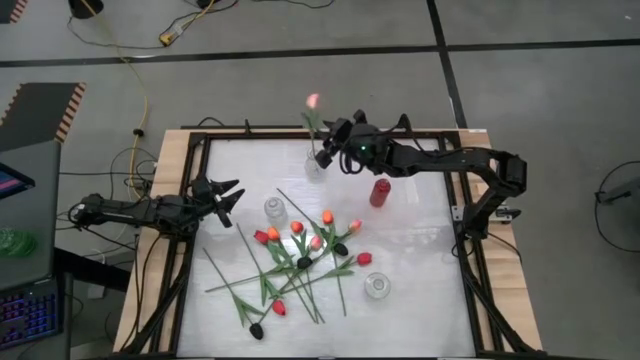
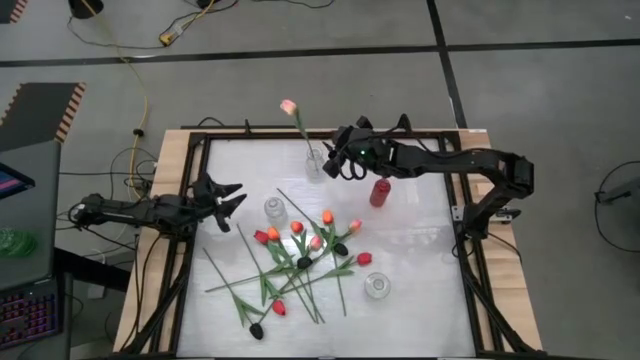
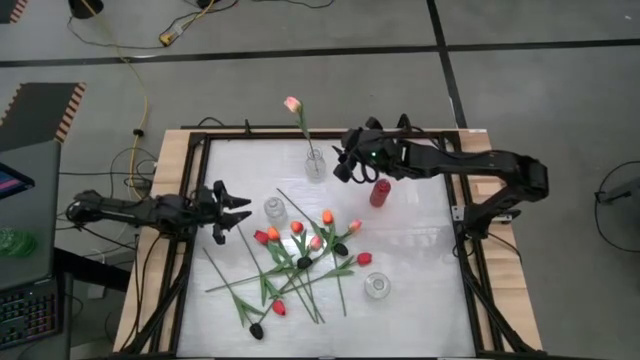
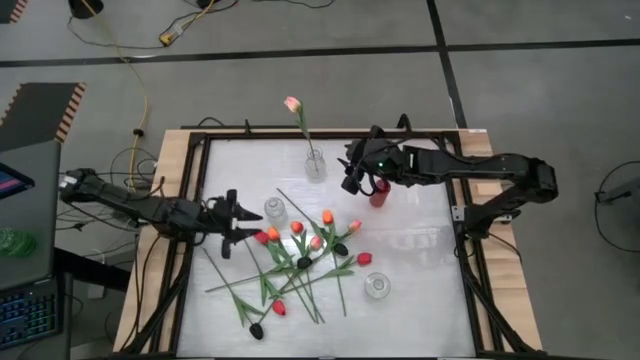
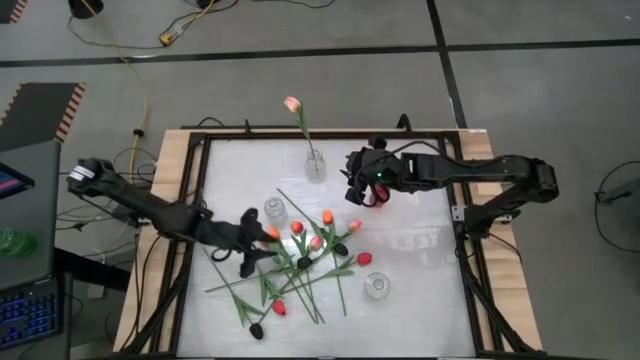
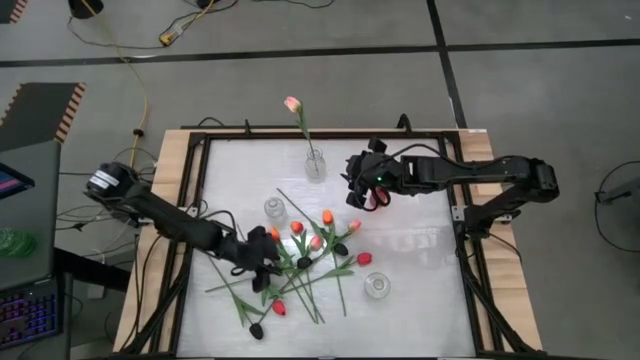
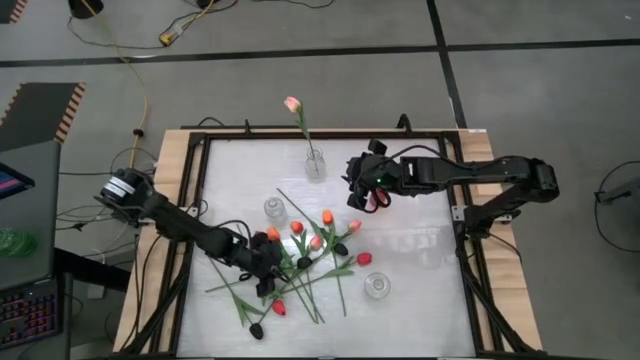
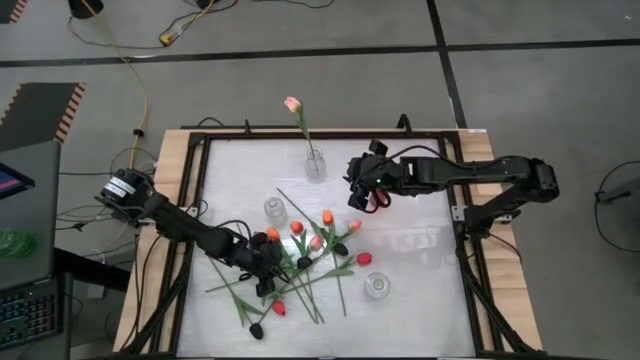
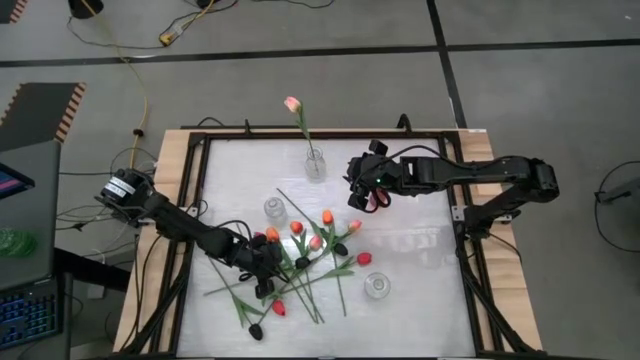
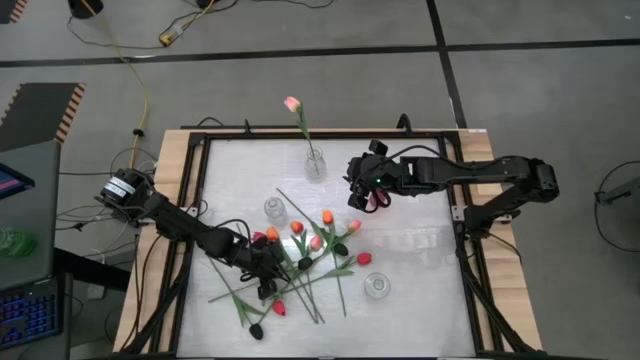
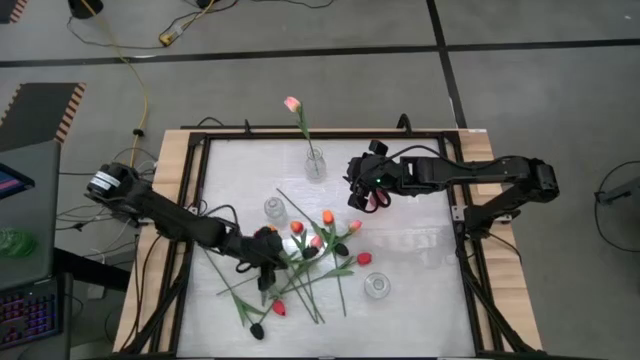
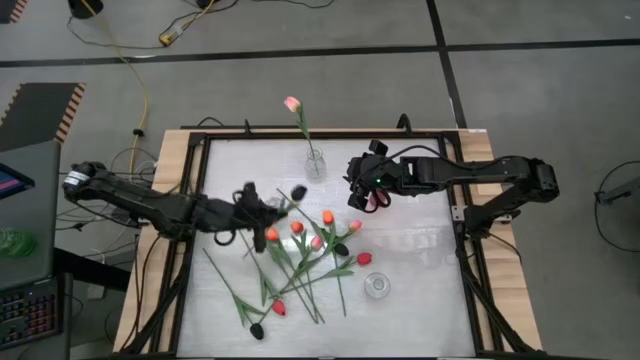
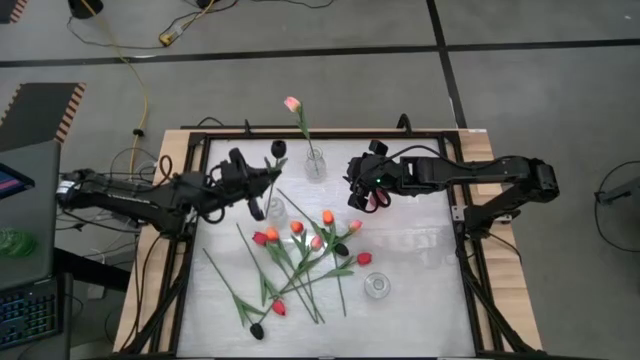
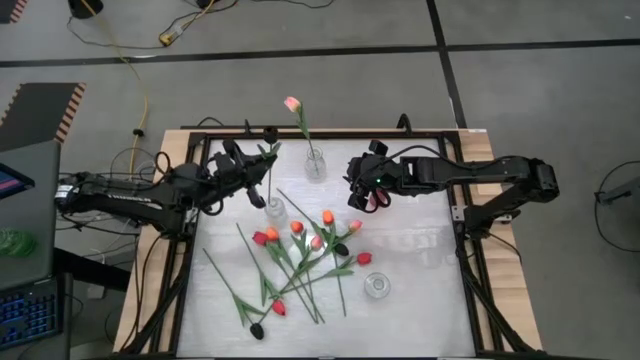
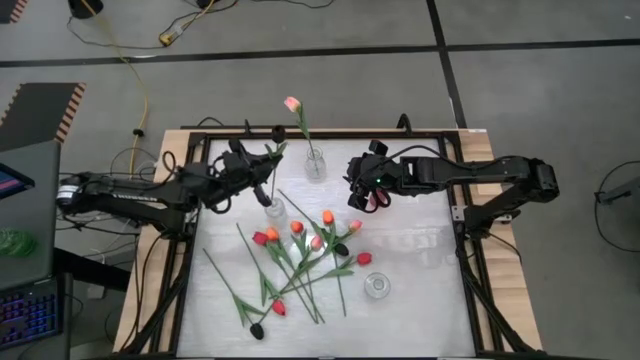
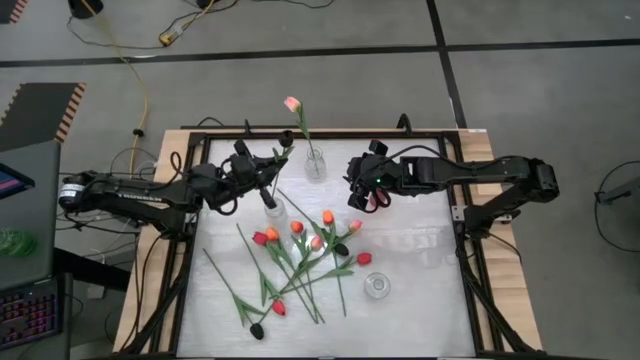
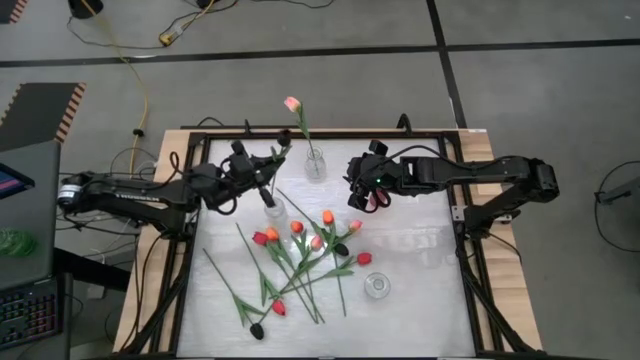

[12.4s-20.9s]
Task: Sort flowers into vase by color
Put the black tulip into the middle transparent vase

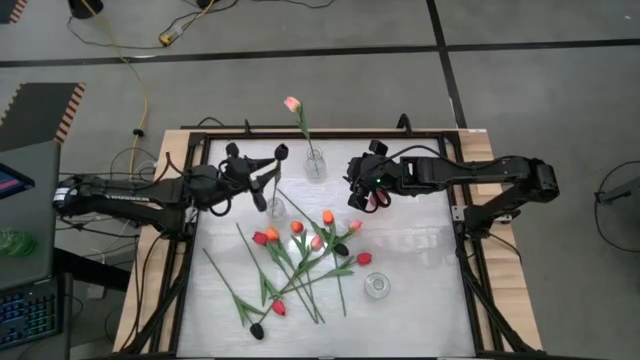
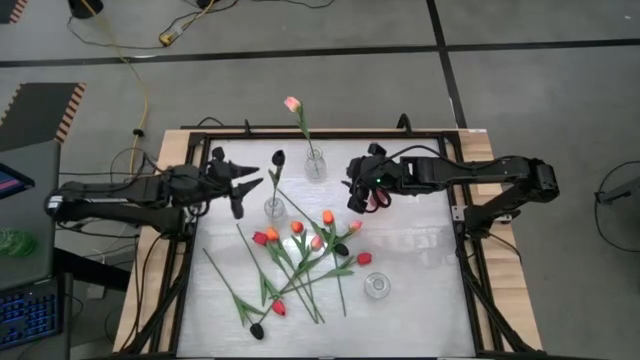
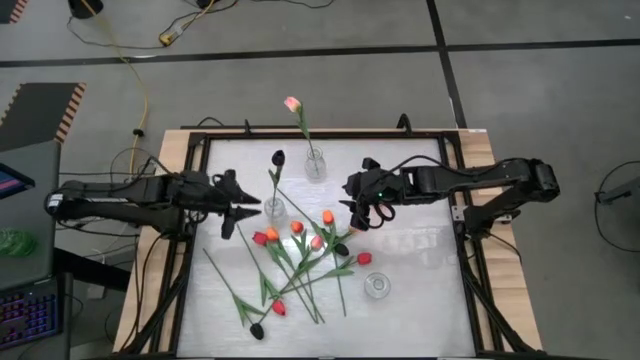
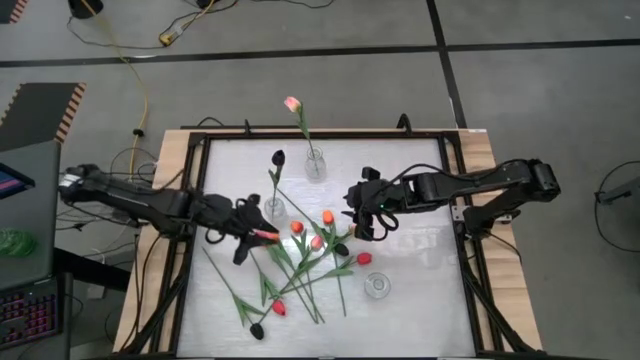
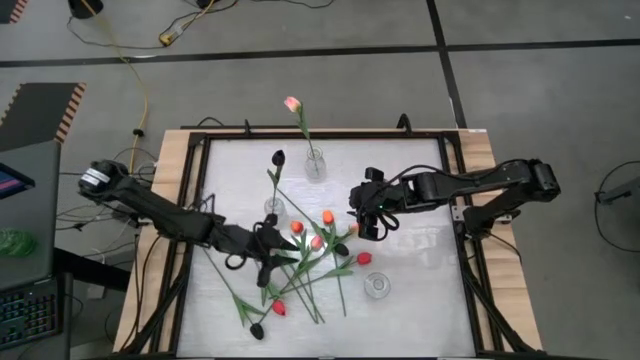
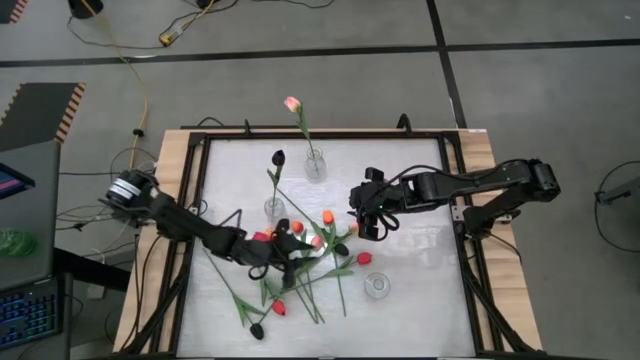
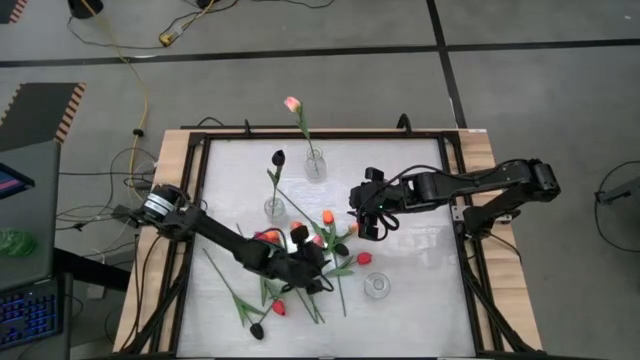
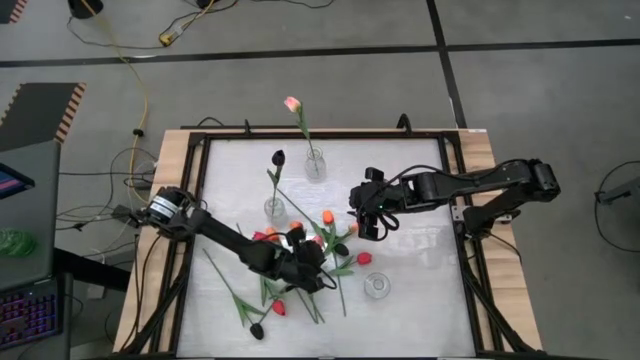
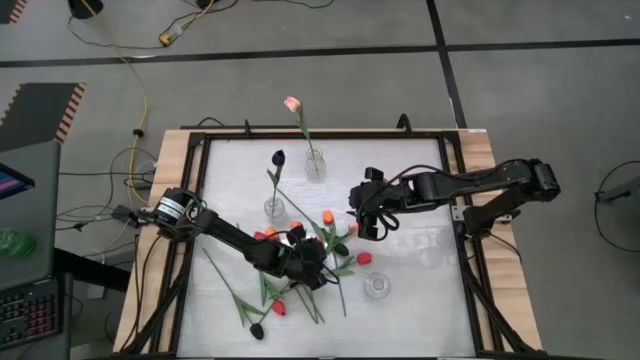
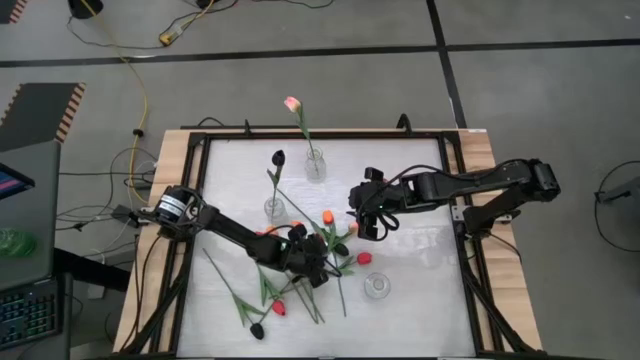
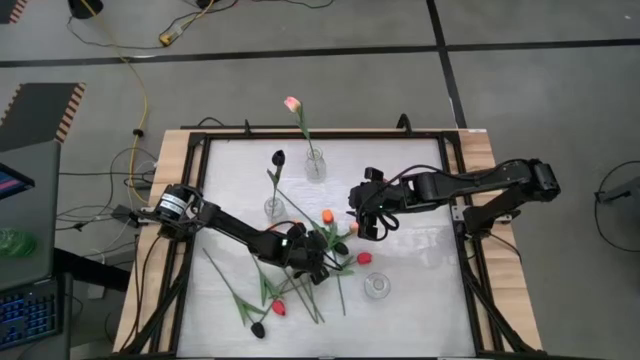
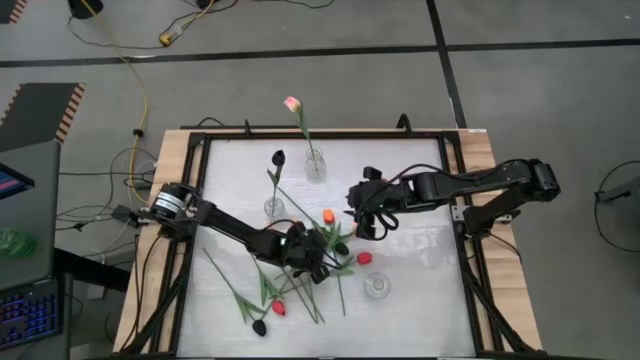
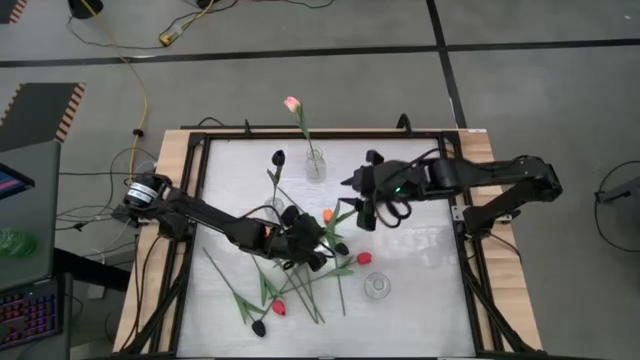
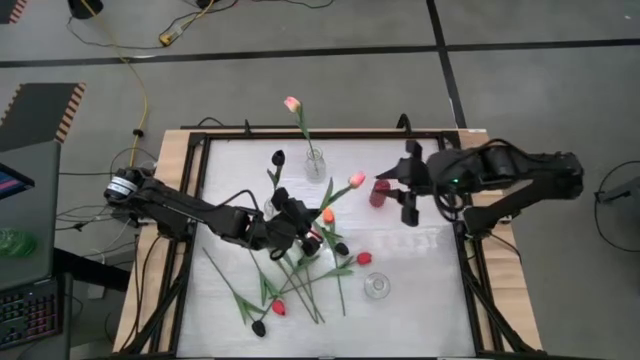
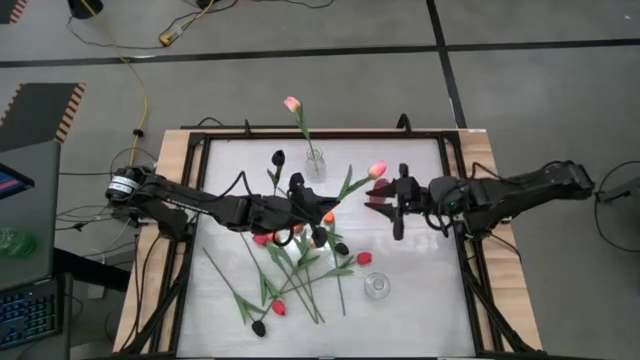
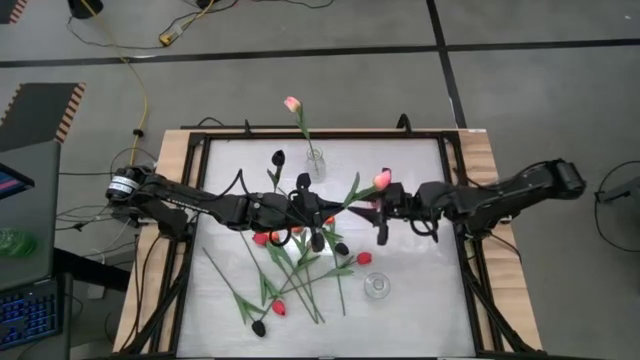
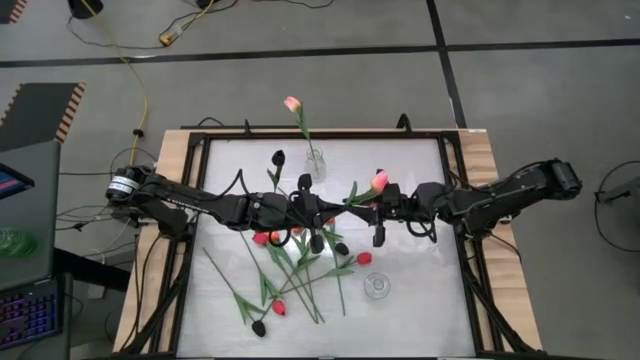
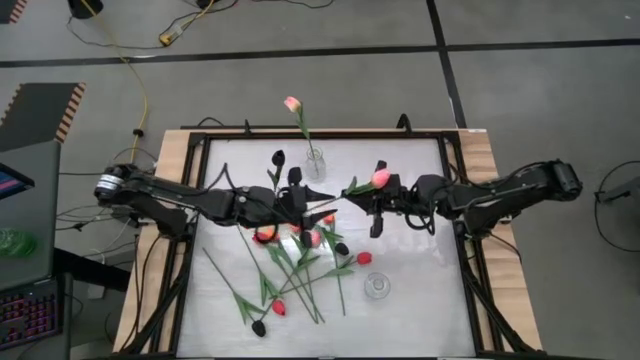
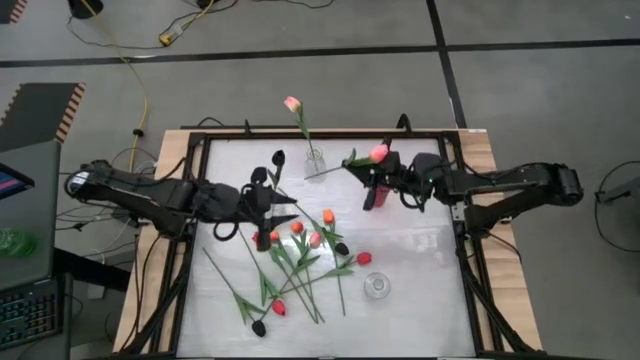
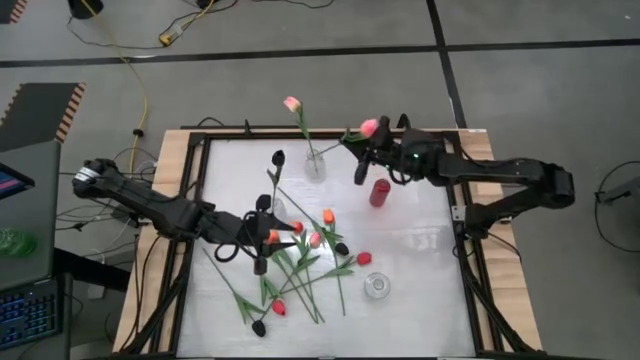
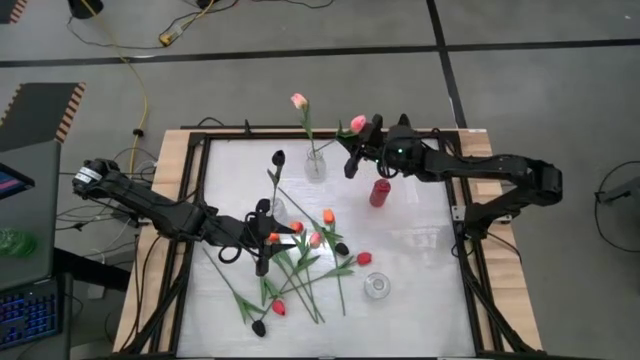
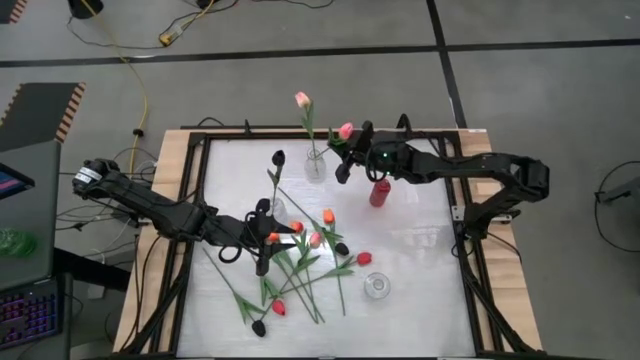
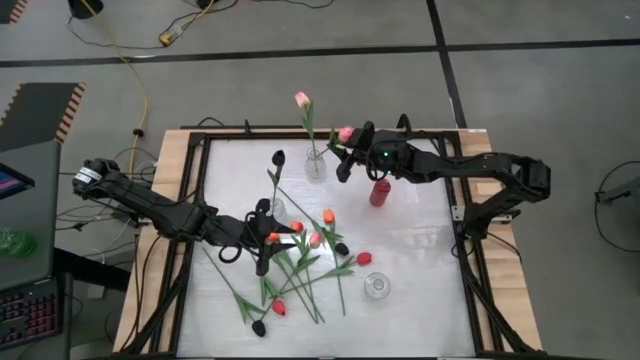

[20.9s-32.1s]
Put the pink tulip into the top transparent vase
